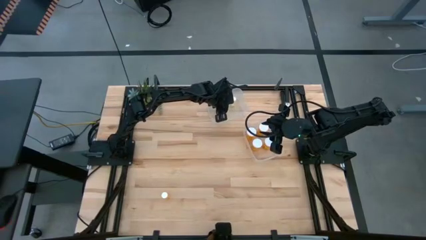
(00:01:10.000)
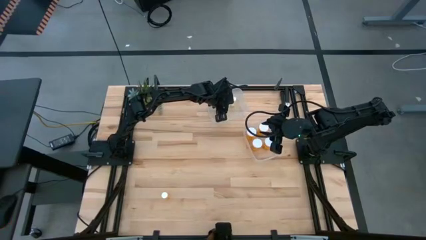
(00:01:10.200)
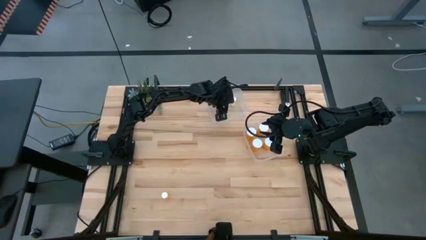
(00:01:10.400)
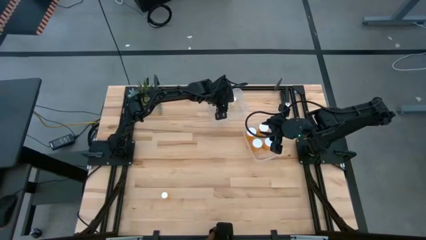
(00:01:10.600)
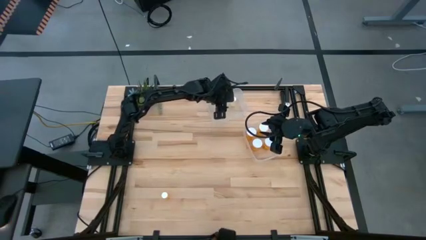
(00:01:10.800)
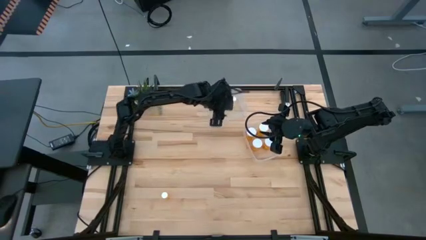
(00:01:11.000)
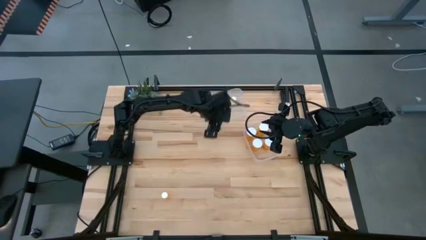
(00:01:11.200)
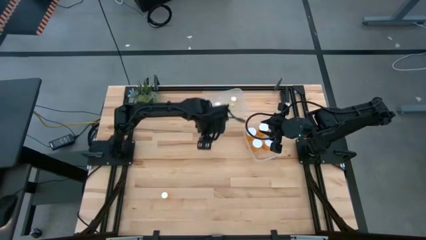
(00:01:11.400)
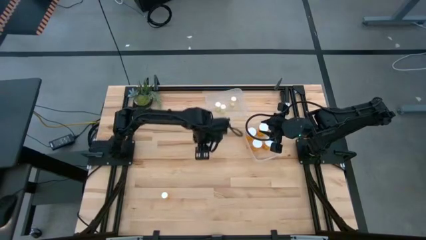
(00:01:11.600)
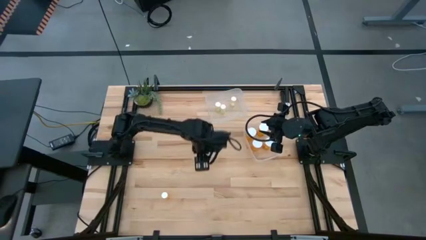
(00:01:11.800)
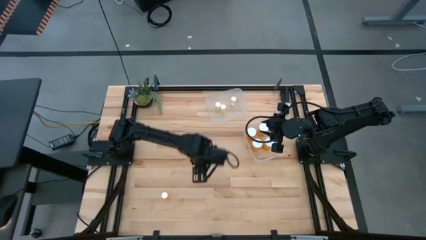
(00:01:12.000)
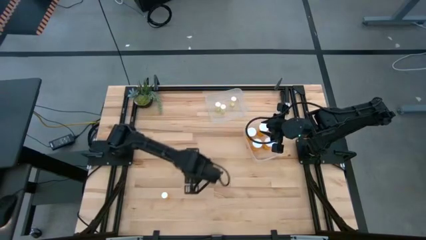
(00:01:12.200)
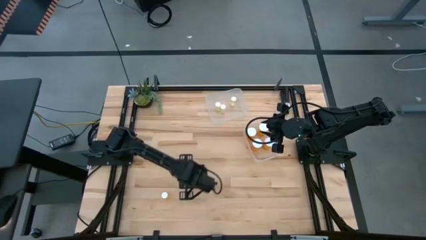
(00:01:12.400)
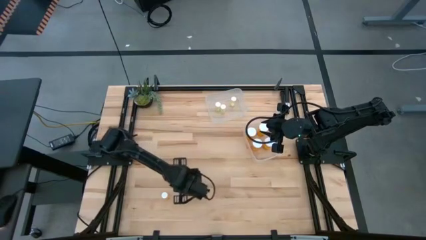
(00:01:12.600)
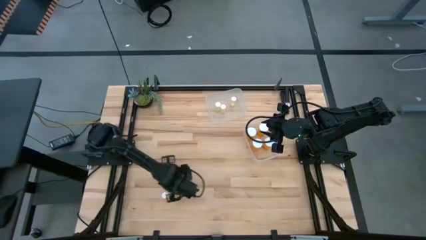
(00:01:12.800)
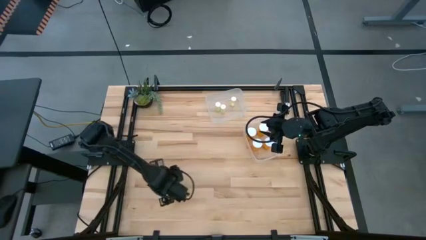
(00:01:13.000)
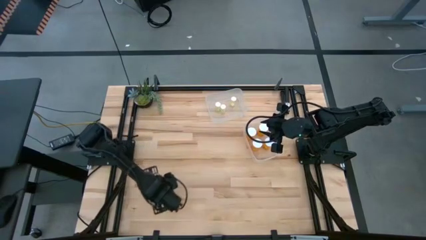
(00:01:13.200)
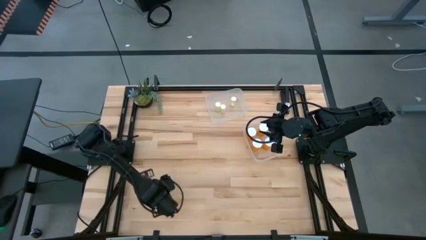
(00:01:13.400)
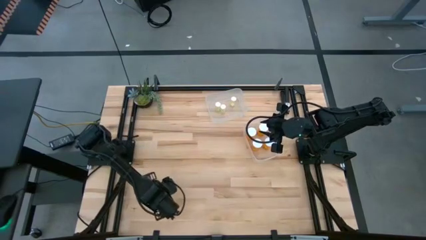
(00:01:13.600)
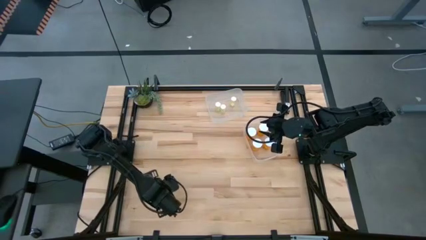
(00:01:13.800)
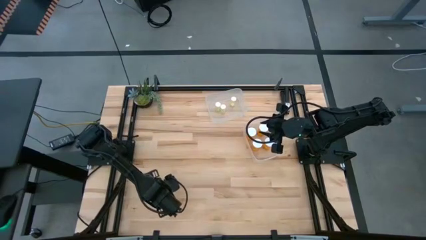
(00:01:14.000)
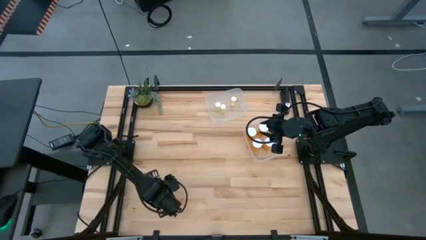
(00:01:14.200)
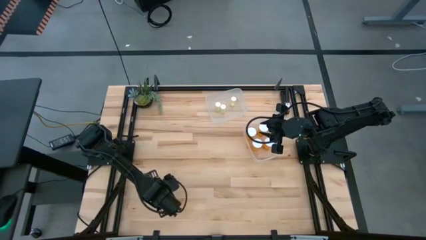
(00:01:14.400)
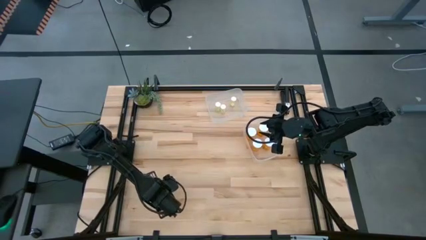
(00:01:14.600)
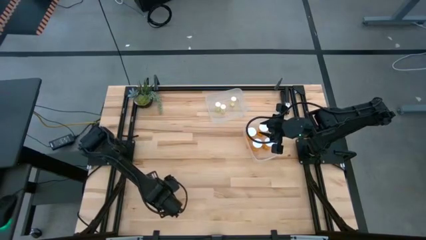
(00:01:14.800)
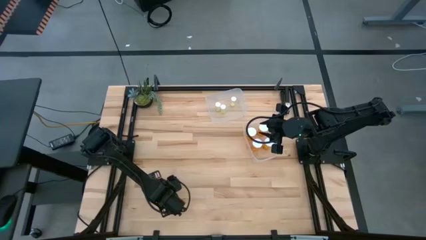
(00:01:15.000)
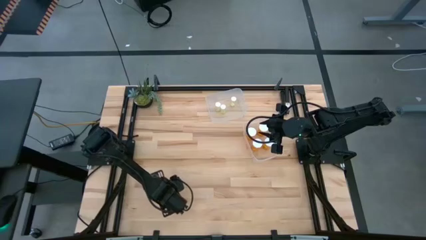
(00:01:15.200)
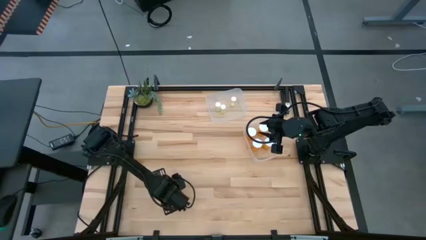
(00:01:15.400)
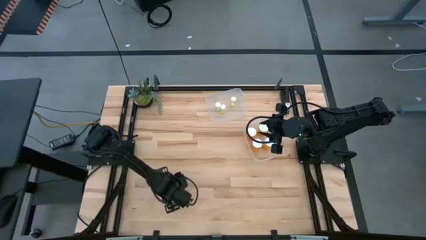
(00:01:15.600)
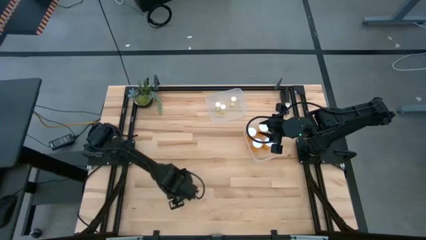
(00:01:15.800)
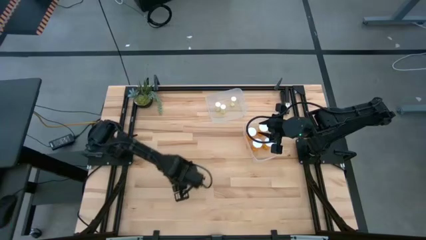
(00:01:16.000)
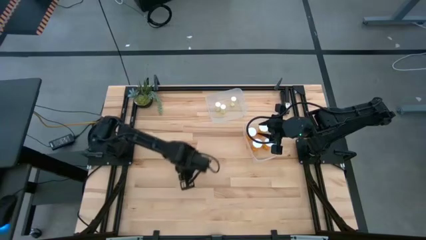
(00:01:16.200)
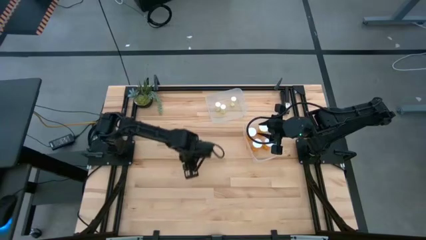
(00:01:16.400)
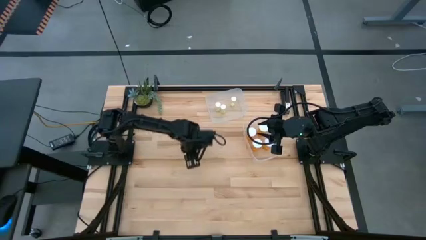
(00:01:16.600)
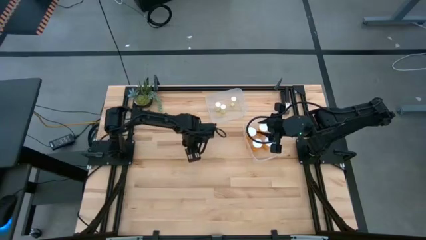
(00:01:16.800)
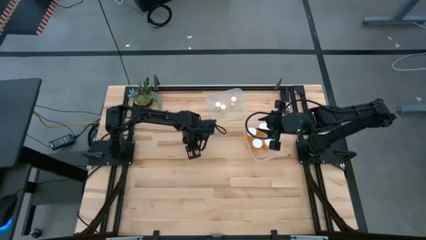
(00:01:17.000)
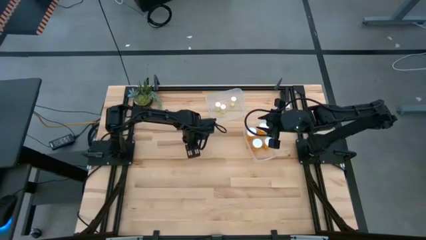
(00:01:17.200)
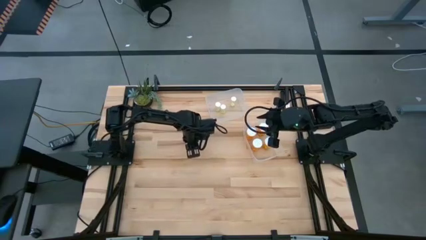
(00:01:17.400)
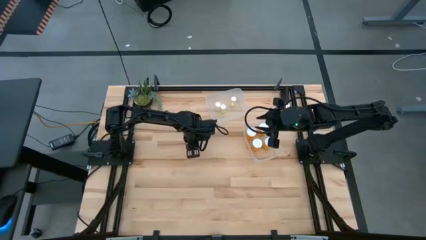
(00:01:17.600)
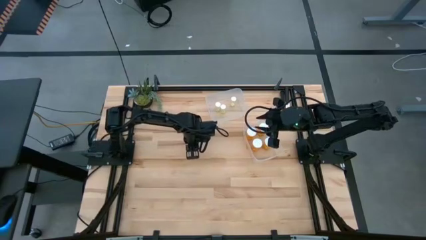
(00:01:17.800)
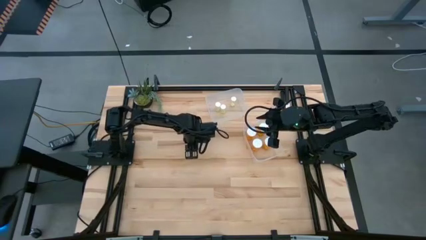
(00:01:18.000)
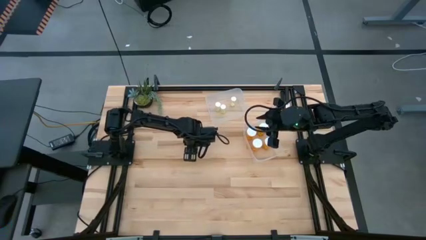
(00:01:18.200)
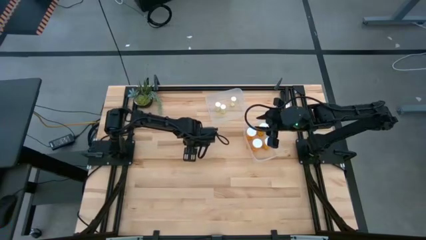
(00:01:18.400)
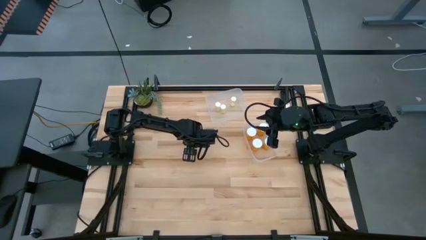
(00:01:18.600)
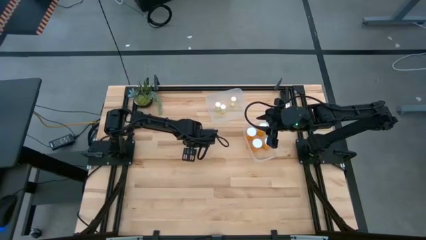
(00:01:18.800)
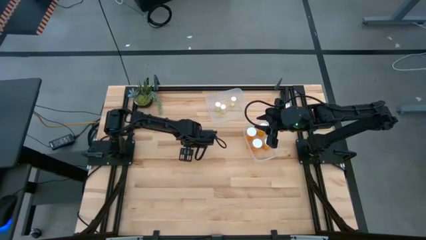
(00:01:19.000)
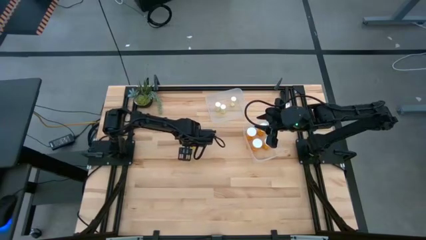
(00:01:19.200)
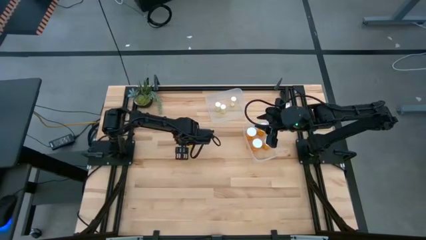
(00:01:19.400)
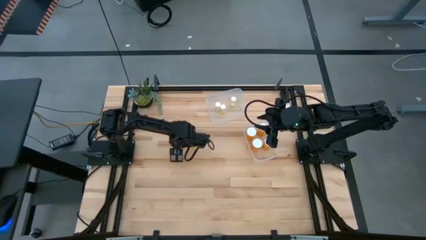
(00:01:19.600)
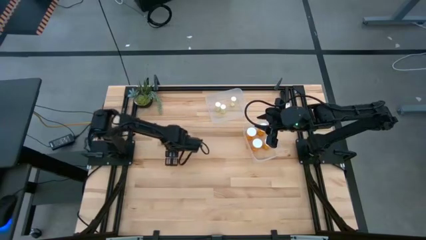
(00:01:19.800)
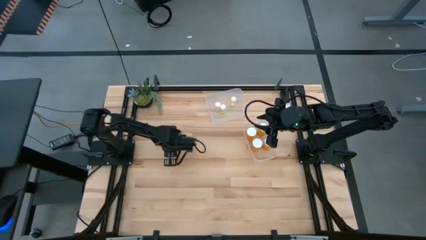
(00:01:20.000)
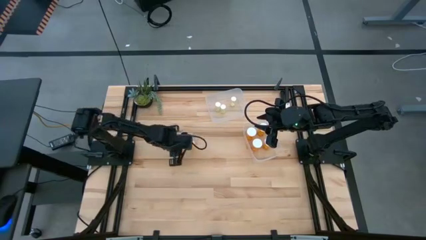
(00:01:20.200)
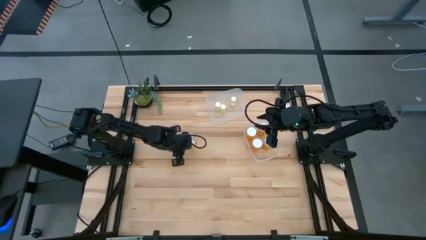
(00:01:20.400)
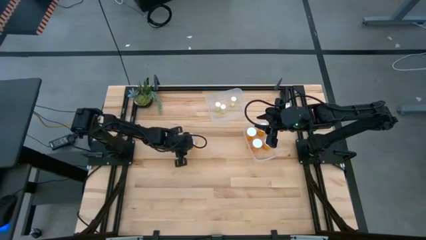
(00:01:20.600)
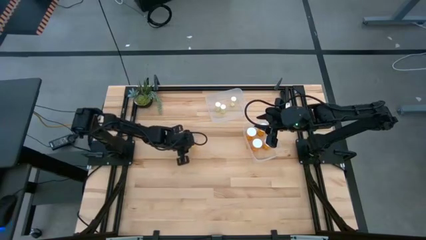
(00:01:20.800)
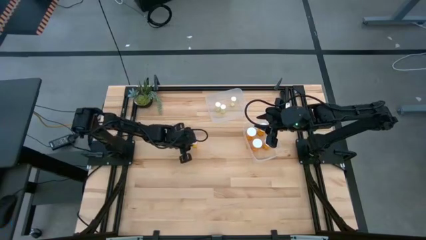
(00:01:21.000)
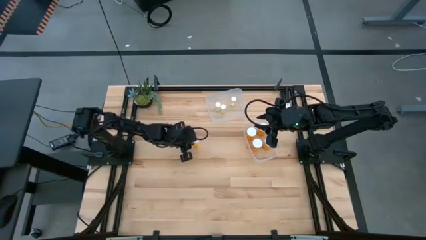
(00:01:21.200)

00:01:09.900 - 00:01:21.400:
Task: Pick and place medicine bottles into bin by pill shape (circle, oval)
Put the small orange pill bottle into the top transparent bin

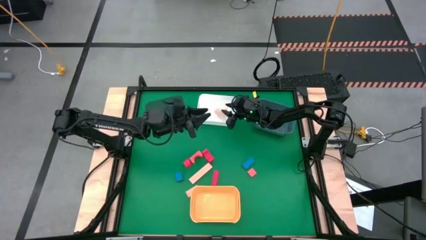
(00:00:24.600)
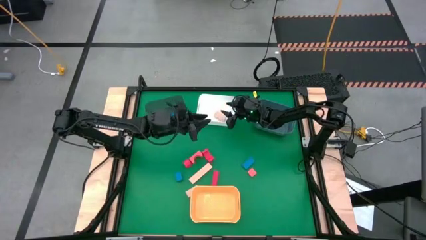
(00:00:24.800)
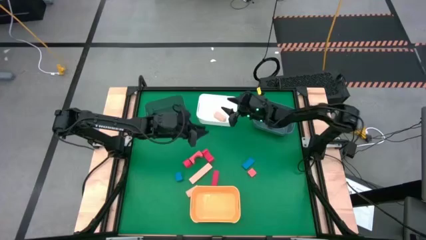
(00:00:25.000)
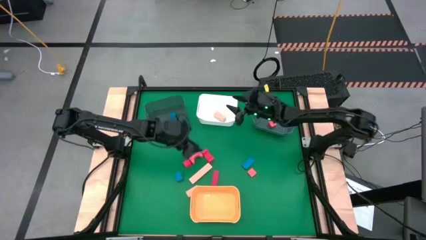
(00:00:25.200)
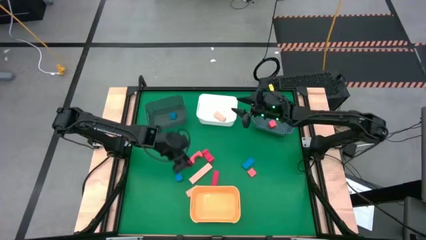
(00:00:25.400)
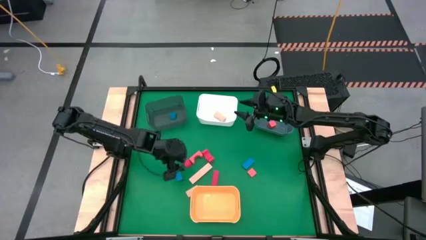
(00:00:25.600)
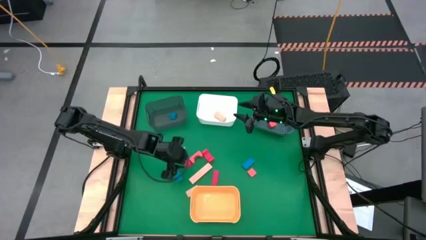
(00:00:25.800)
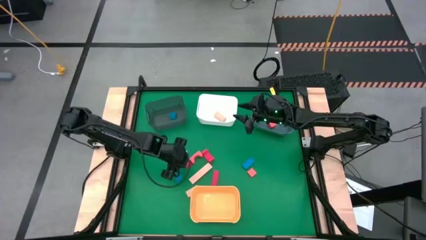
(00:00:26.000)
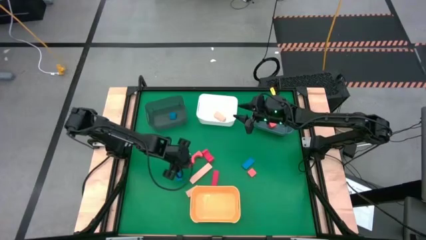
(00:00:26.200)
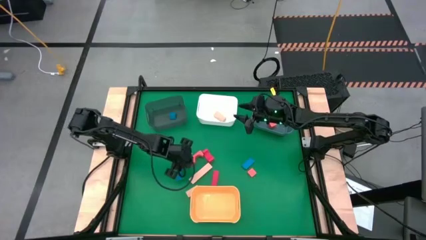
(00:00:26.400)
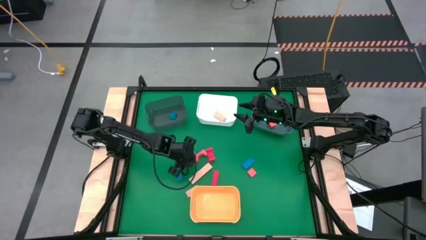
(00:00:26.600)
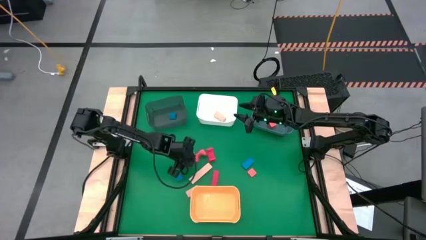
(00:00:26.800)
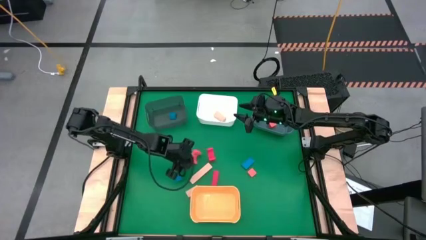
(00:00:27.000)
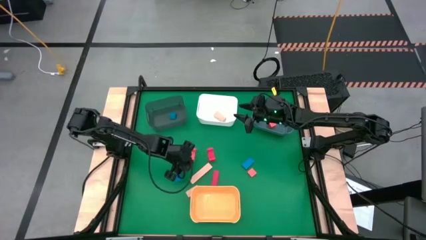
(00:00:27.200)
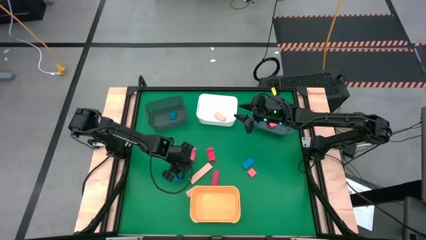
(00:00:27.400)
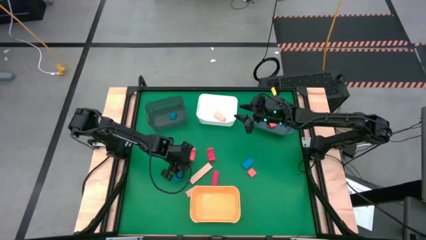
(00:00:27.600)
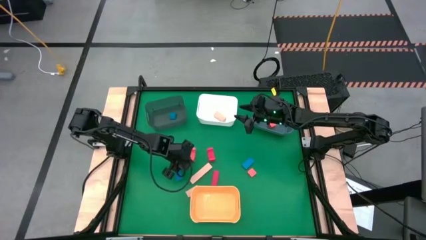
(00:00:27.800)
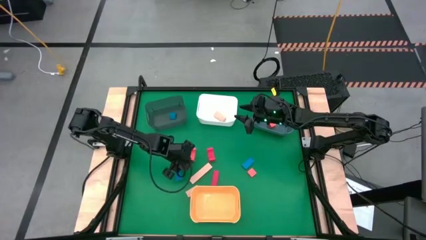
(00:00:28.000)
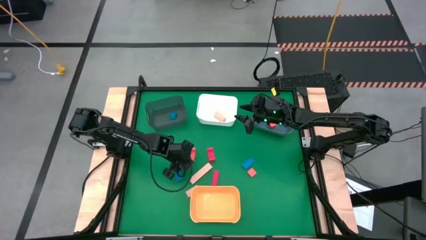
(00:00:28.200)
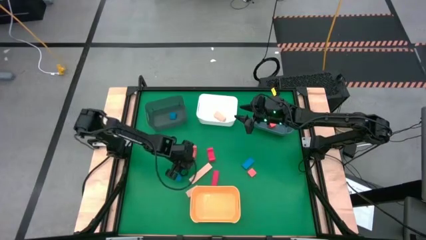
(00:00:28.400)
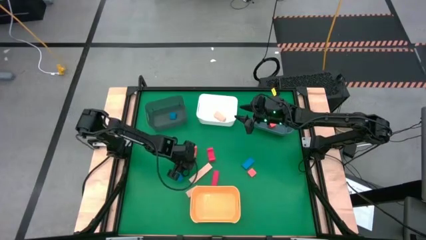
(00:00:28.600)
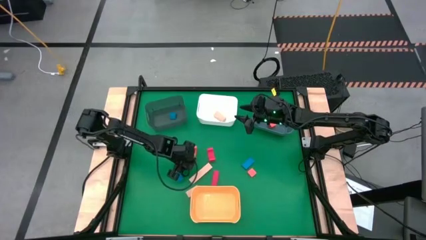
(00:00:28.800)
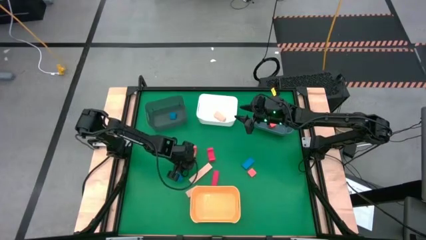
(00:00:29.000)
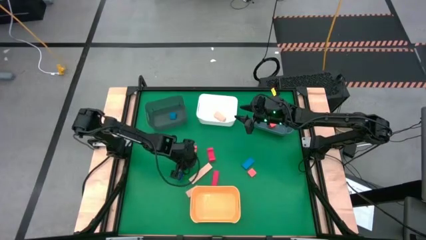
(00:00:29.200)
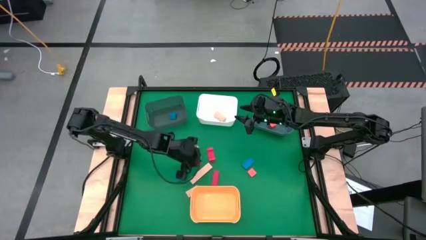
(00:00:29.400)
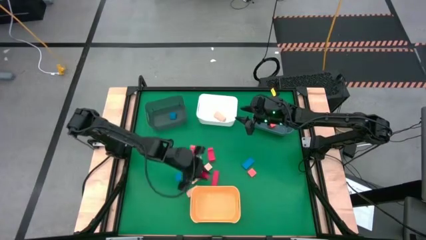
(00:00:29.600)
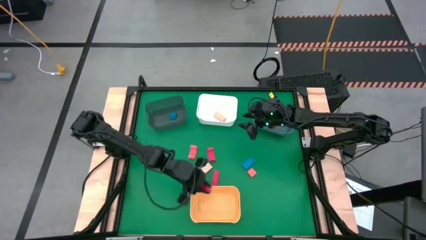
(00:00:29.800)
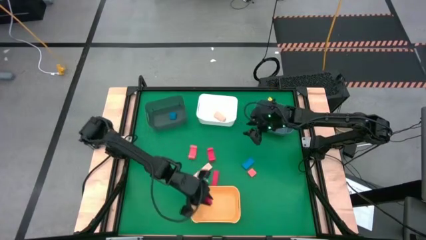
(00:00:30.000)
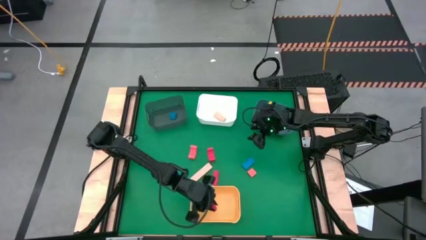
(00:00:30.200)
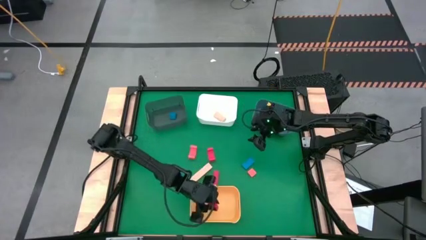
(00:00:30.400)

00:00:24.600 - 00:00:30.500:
Task: Sort & place blocks by color
Put the red block into the yellow bin
